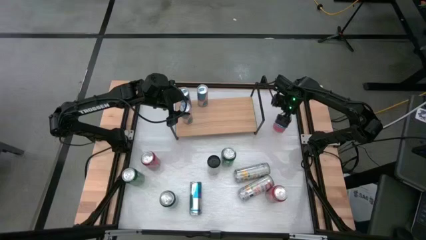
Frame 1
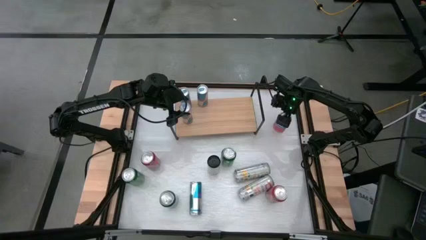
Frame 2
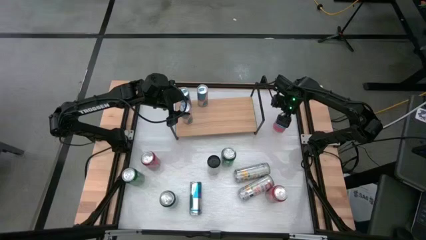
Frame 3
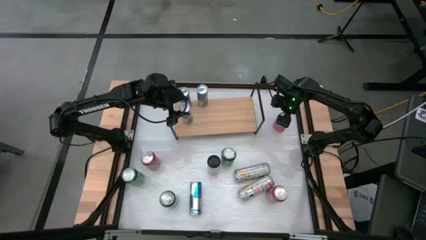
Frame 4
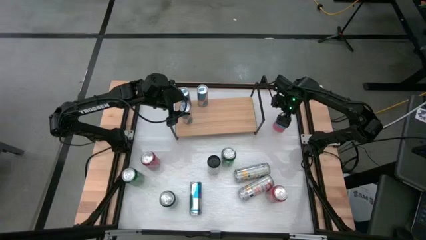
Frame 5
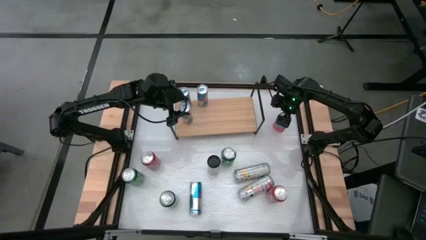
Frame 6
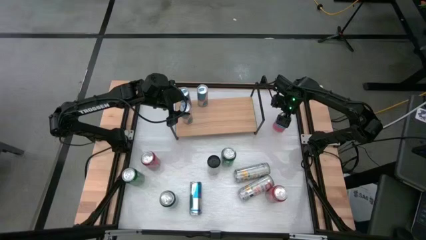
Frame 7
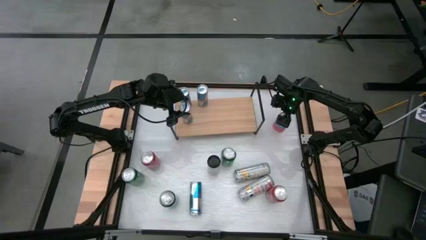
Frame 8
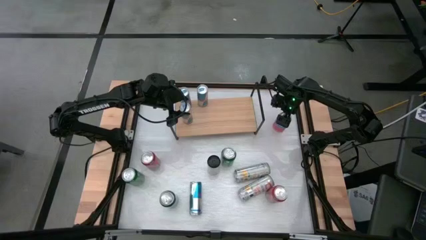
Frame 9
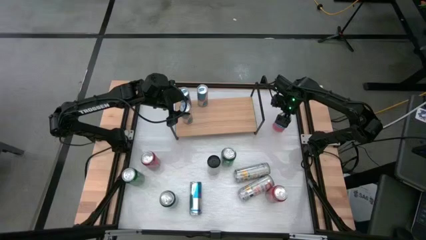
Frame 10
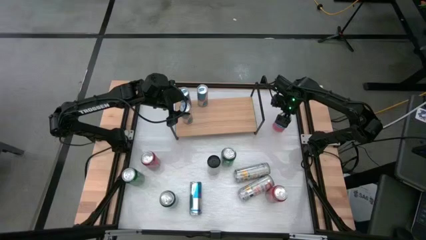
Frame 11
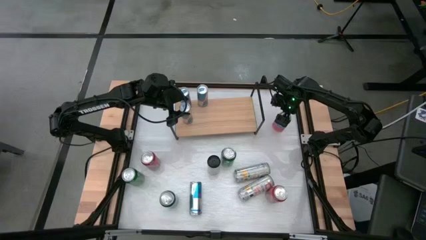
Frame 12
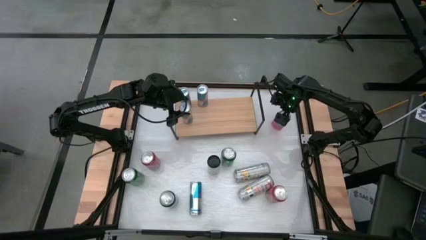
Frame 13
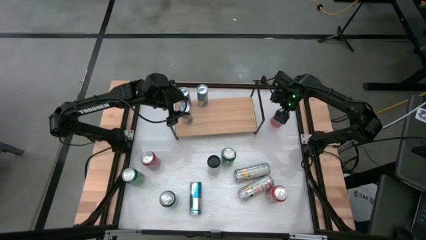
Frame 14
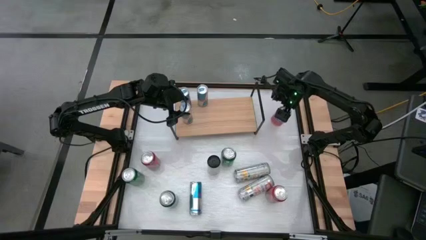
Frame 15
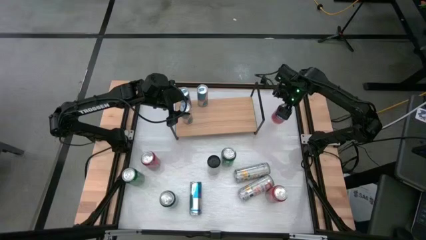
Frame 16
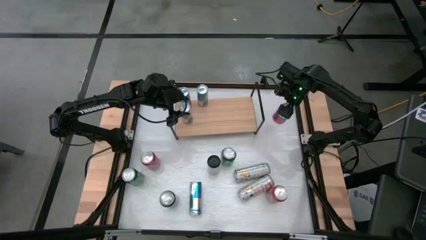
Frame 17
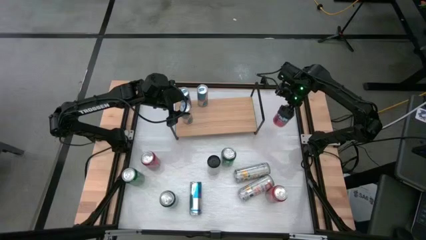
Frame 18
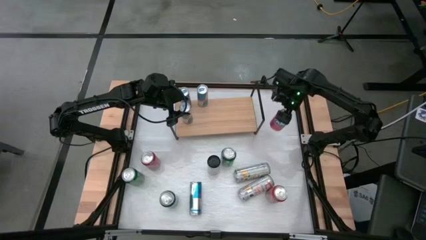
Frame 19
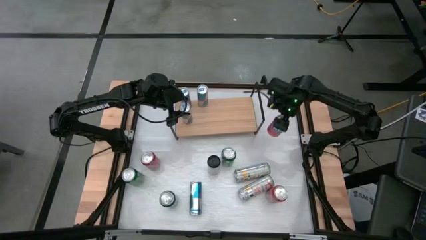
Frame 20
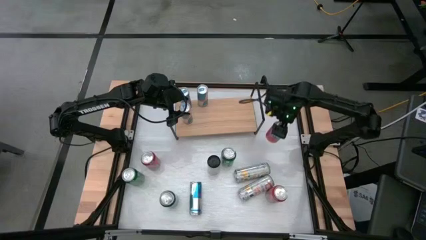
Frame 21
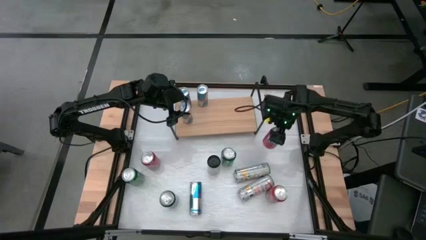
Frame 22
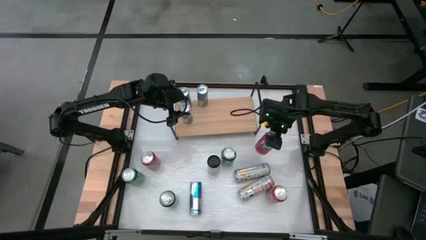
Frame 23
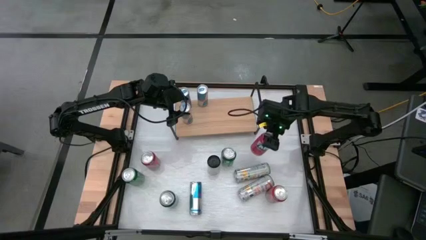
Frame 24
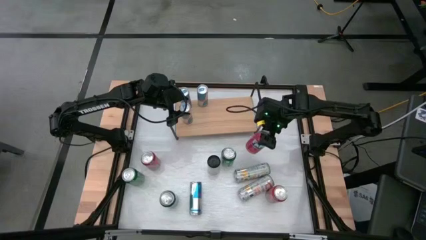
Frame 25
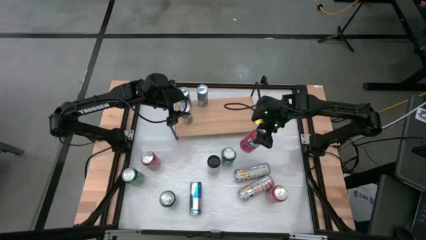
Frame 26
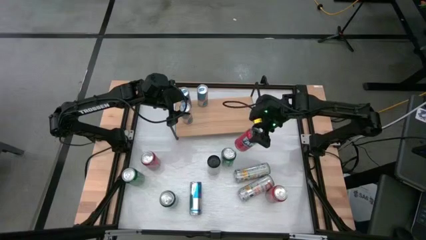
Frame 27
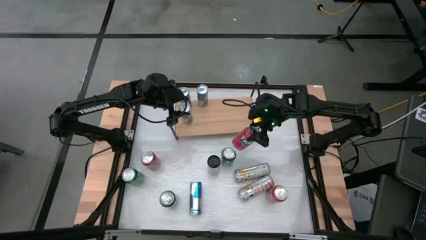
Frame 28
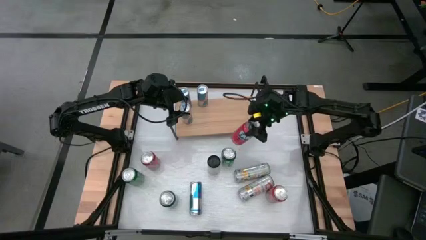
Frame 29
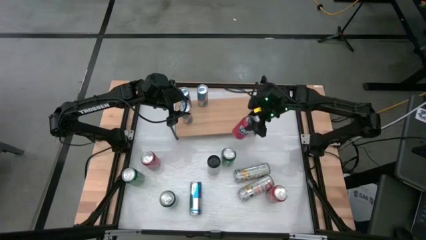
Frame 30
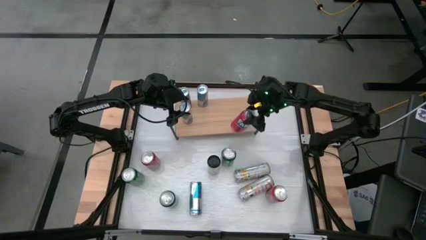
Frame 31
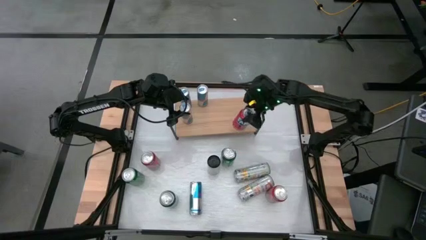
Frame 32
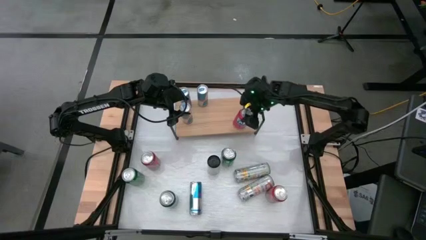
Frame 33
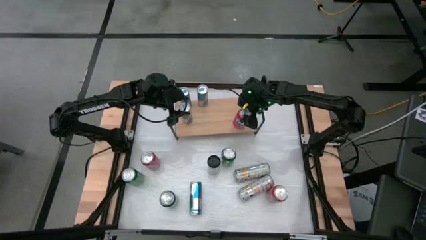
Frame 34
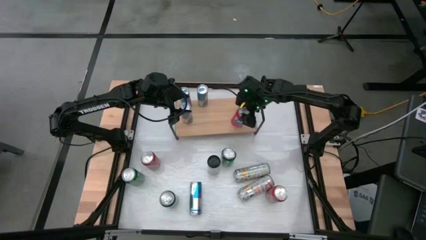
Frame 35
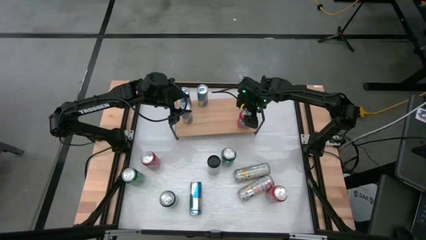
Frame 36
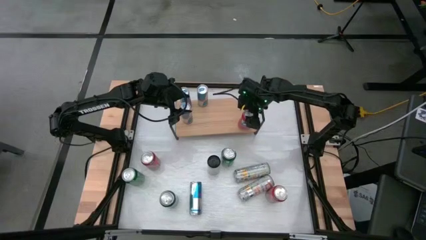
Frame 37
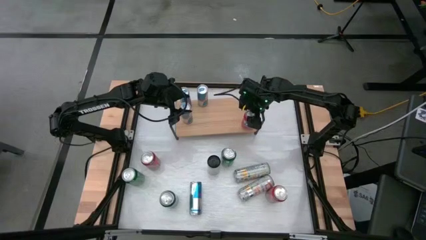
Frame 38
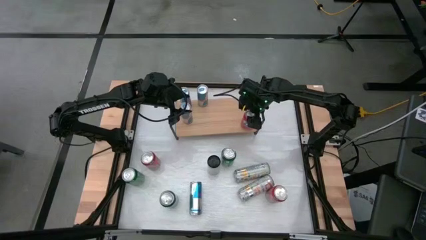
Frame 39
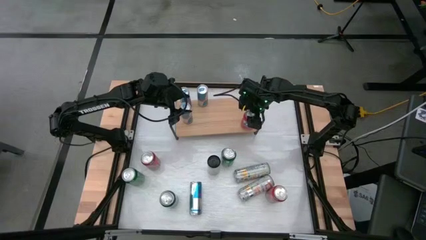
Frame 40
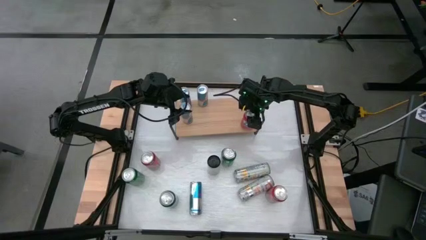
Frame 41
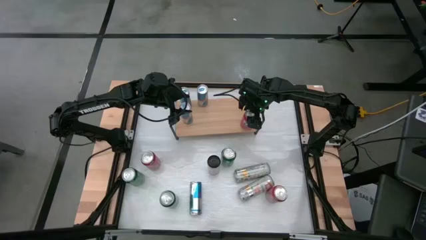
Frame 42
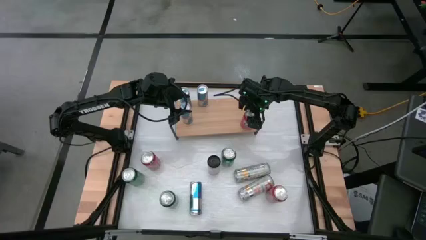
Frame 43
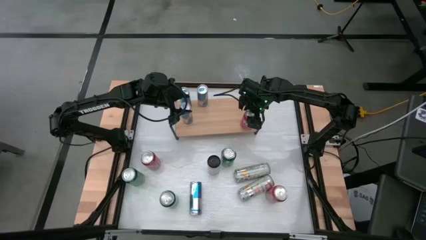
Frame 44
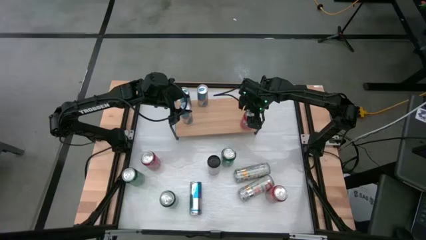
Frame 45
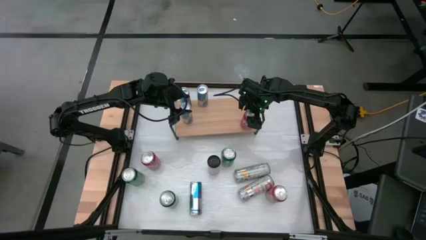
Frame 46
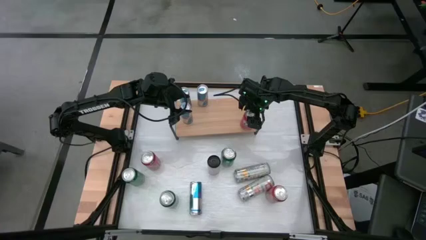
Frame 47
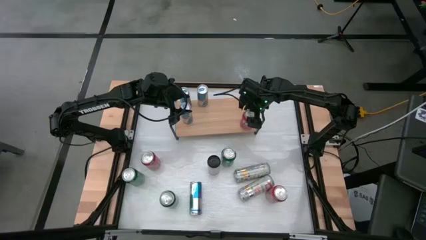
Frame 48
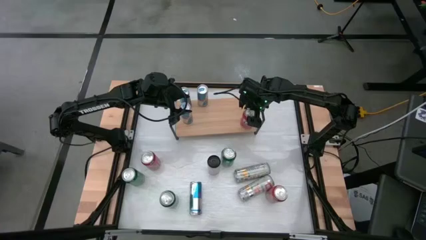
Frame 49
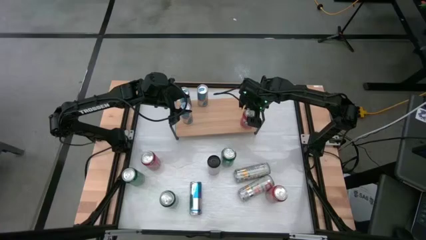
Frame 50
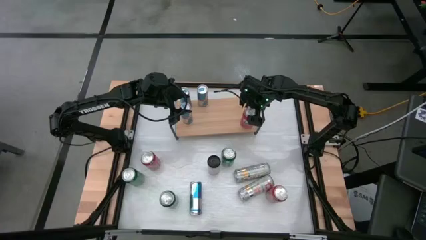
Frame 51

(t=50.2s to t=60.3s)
Task: Sort soda cans
Put the orange soda can on the shelf
